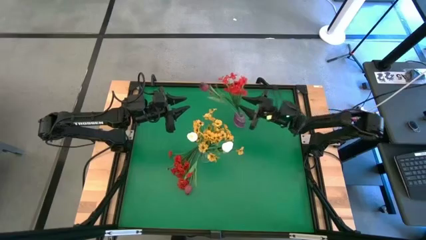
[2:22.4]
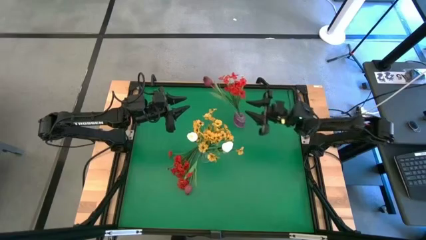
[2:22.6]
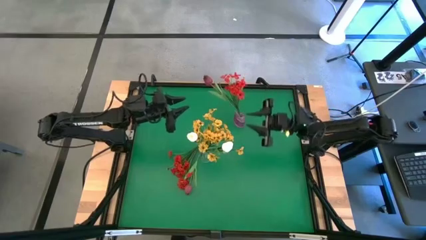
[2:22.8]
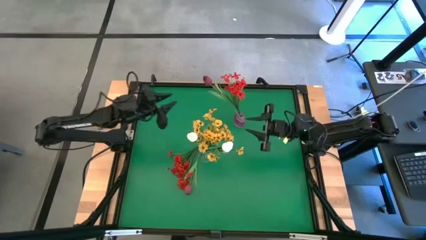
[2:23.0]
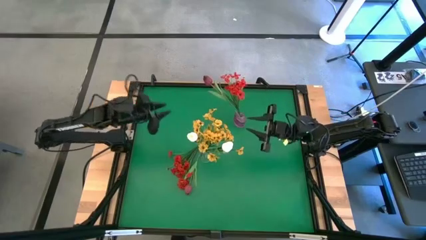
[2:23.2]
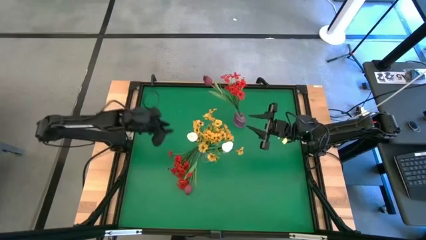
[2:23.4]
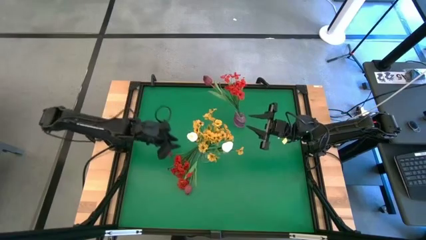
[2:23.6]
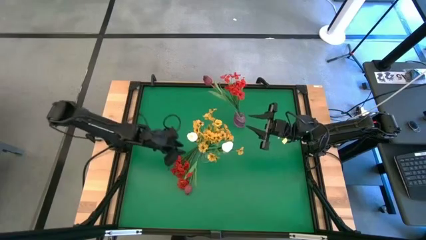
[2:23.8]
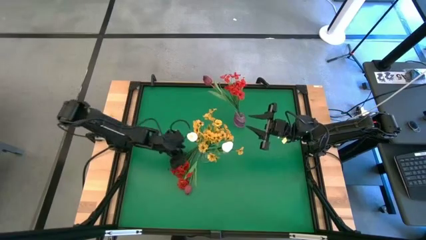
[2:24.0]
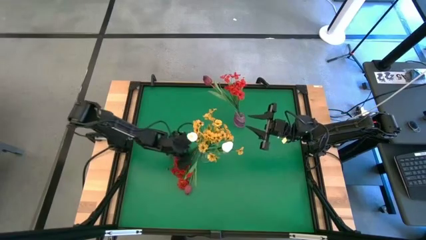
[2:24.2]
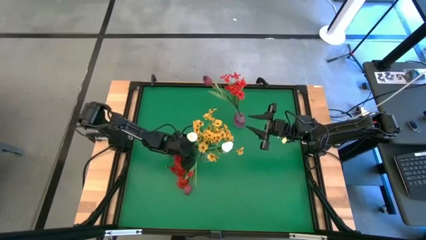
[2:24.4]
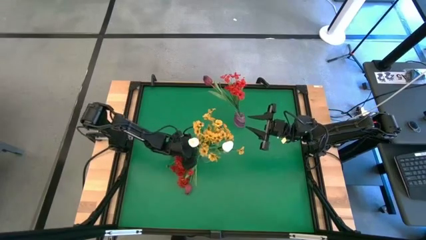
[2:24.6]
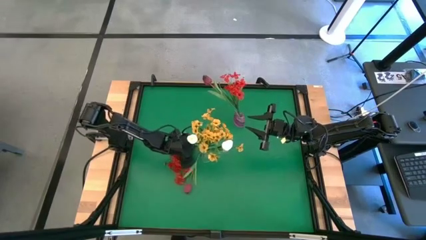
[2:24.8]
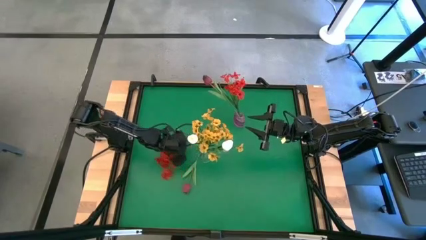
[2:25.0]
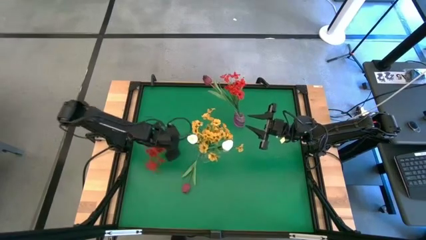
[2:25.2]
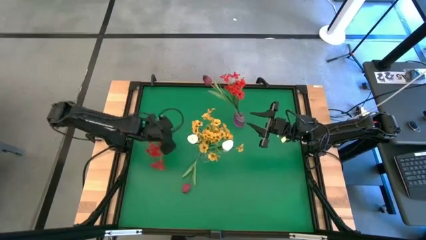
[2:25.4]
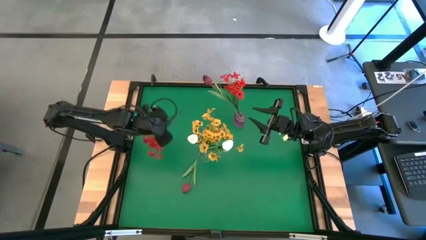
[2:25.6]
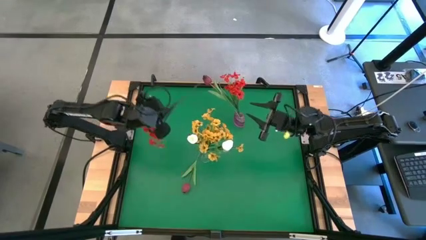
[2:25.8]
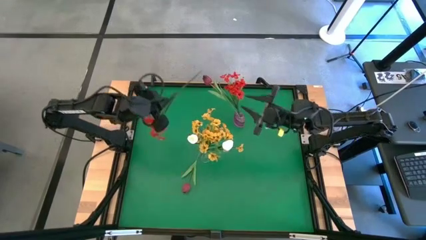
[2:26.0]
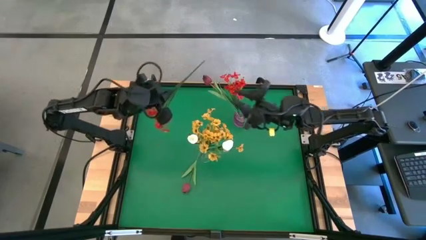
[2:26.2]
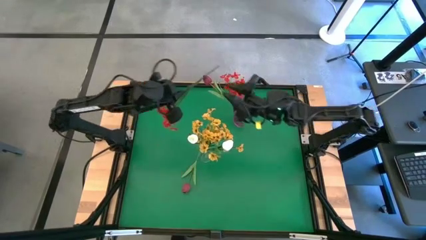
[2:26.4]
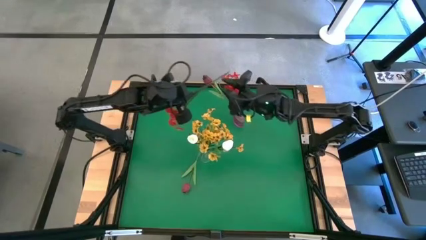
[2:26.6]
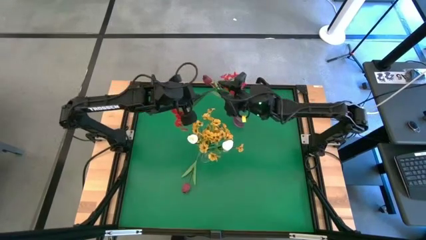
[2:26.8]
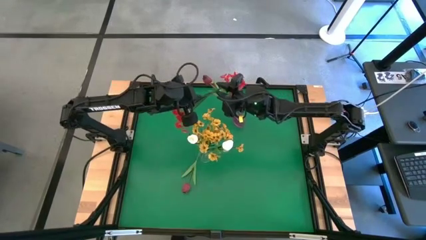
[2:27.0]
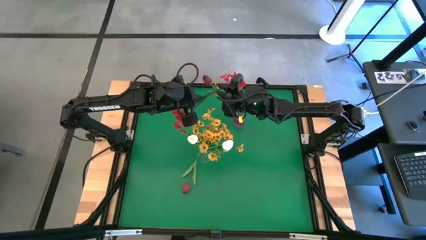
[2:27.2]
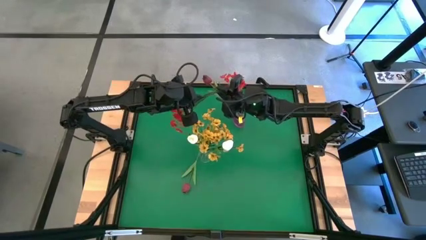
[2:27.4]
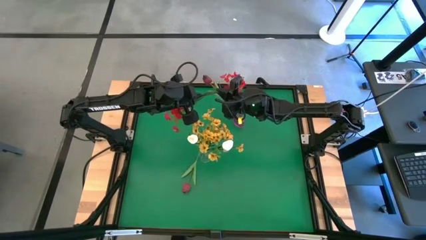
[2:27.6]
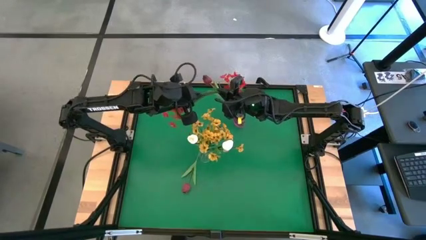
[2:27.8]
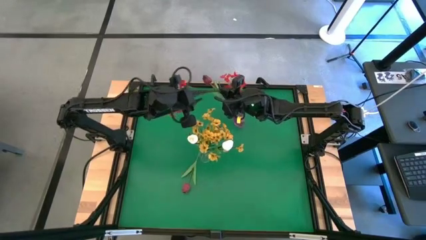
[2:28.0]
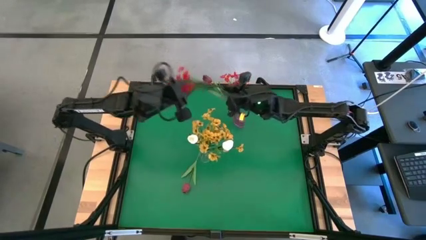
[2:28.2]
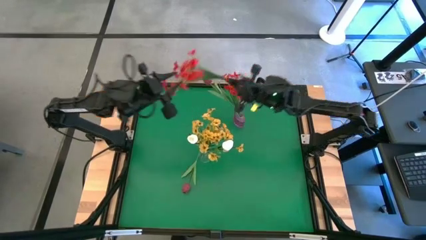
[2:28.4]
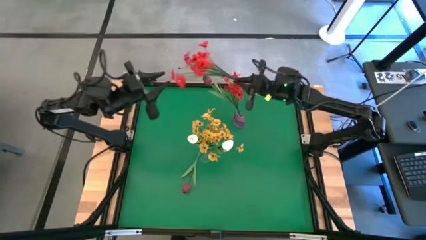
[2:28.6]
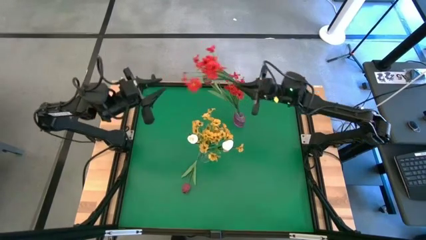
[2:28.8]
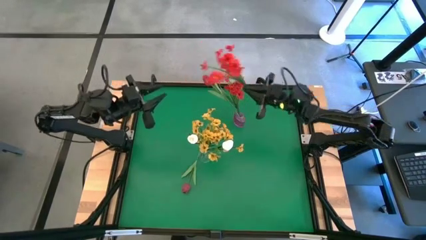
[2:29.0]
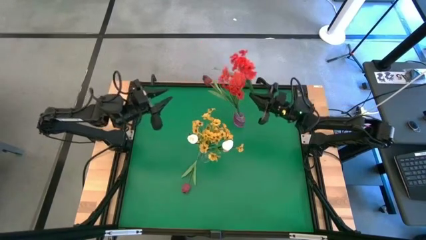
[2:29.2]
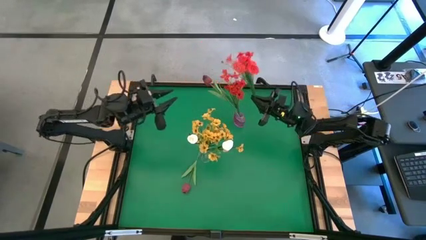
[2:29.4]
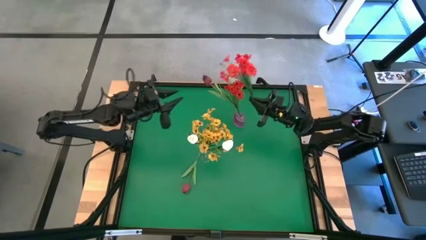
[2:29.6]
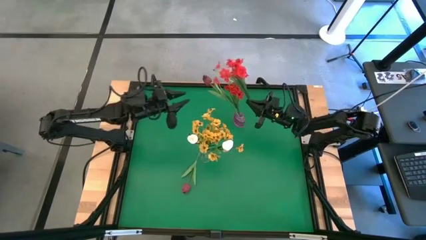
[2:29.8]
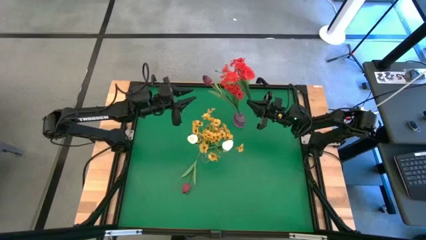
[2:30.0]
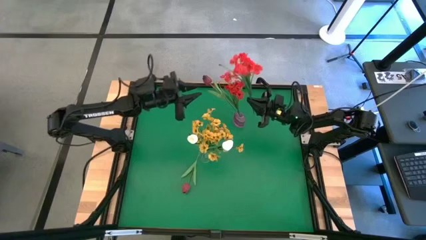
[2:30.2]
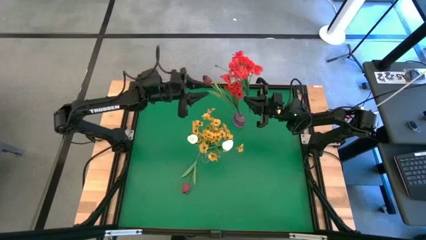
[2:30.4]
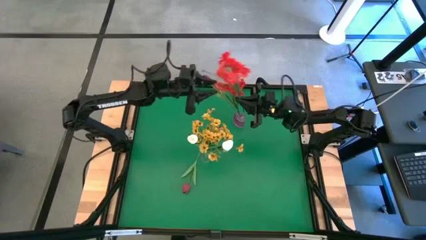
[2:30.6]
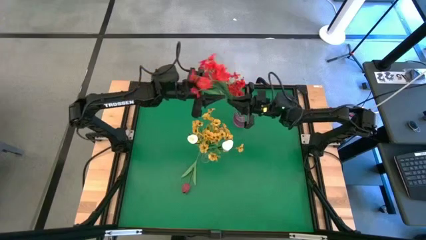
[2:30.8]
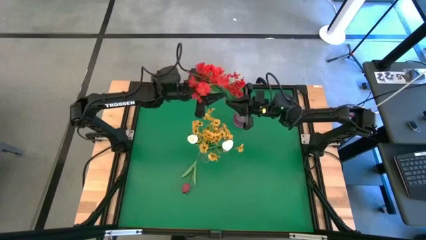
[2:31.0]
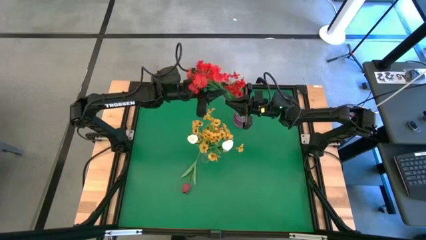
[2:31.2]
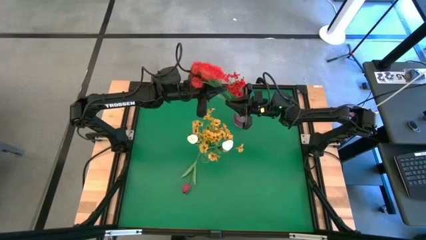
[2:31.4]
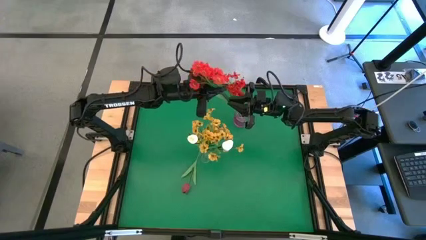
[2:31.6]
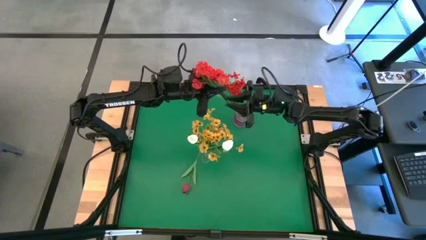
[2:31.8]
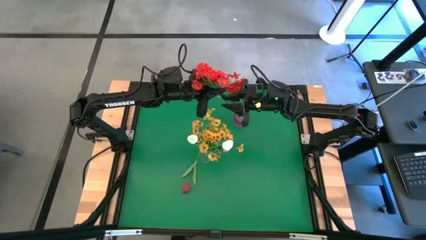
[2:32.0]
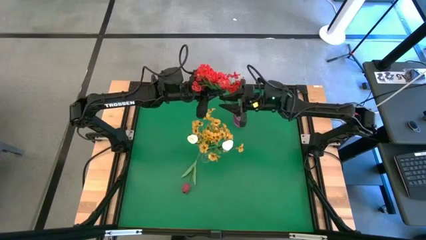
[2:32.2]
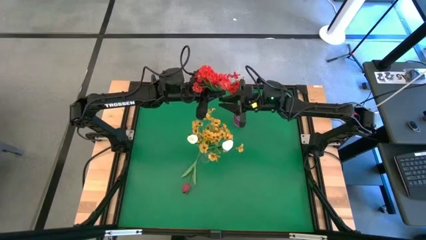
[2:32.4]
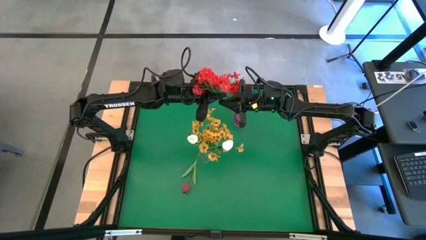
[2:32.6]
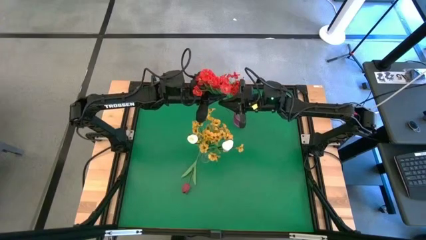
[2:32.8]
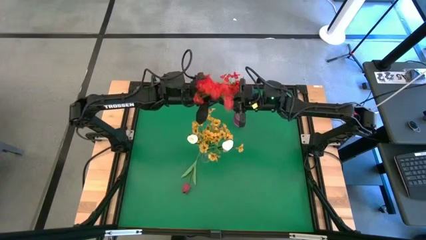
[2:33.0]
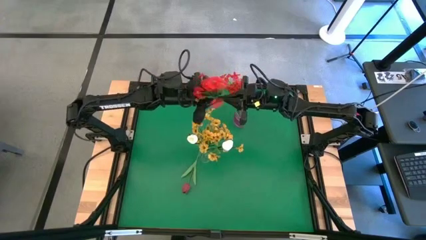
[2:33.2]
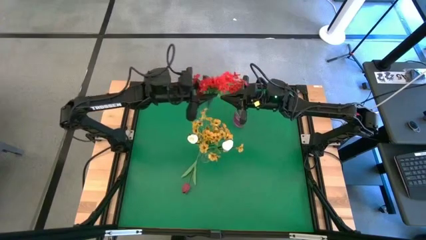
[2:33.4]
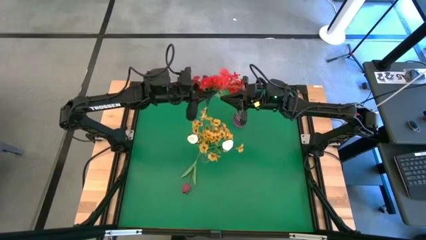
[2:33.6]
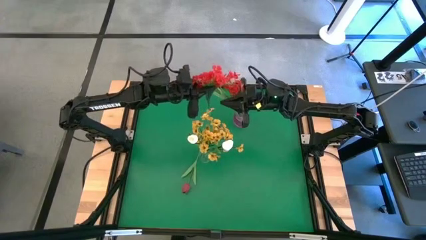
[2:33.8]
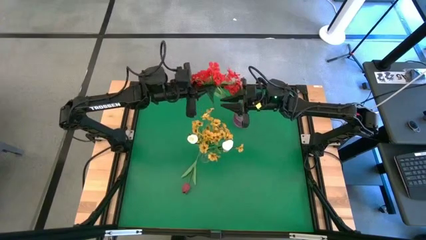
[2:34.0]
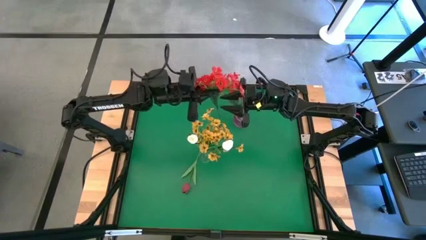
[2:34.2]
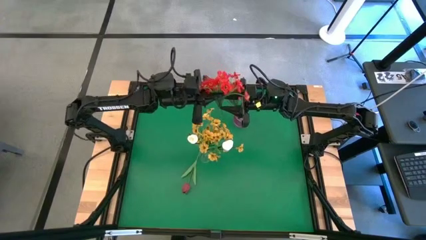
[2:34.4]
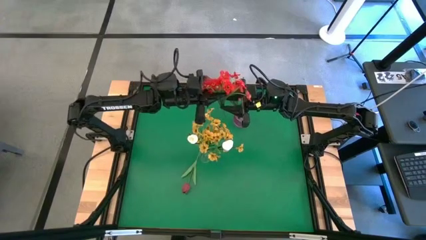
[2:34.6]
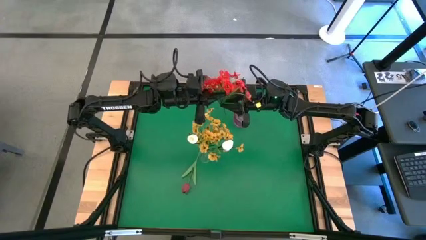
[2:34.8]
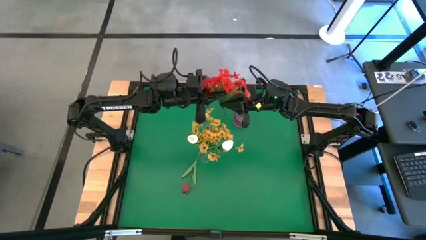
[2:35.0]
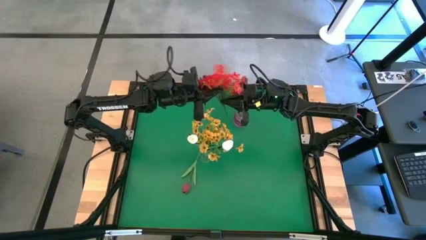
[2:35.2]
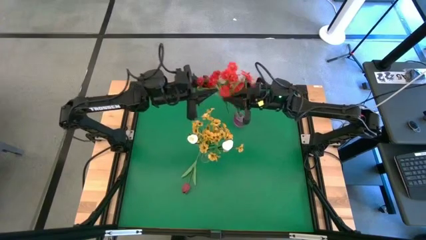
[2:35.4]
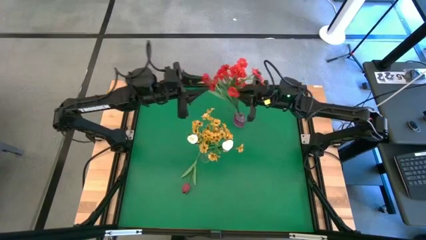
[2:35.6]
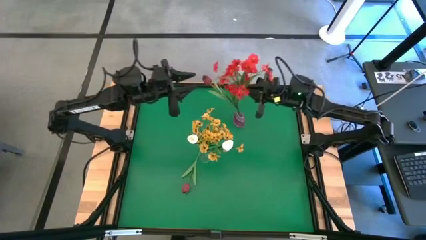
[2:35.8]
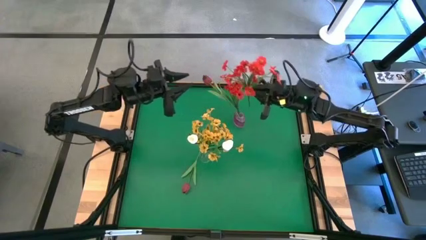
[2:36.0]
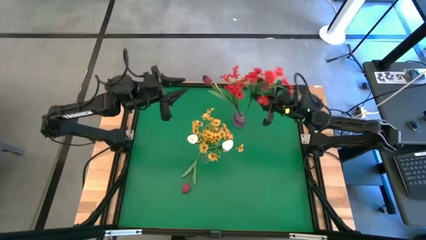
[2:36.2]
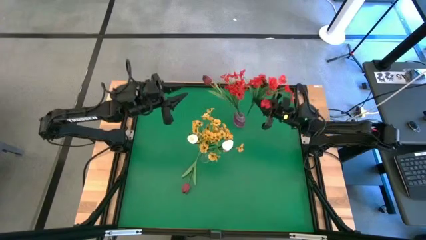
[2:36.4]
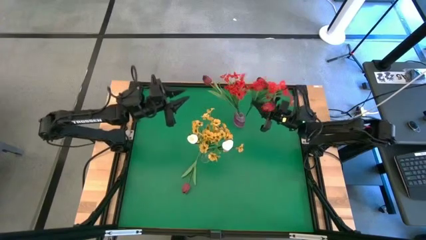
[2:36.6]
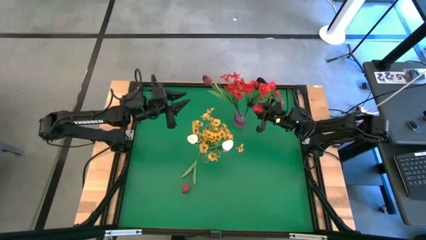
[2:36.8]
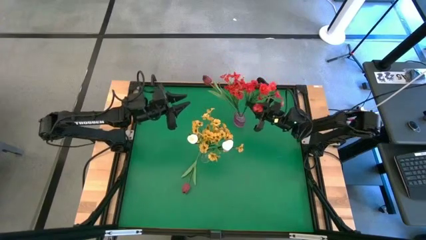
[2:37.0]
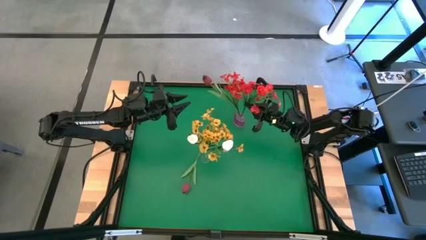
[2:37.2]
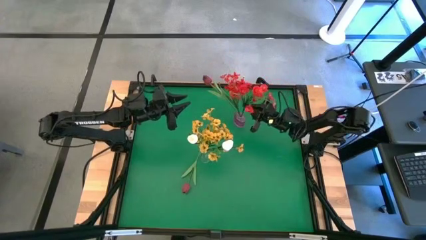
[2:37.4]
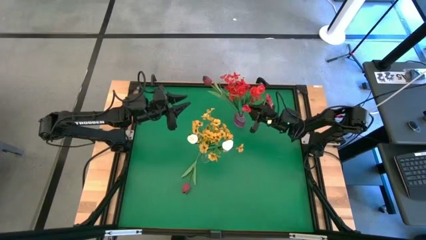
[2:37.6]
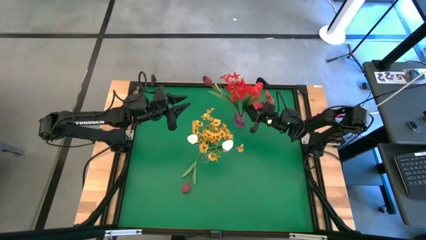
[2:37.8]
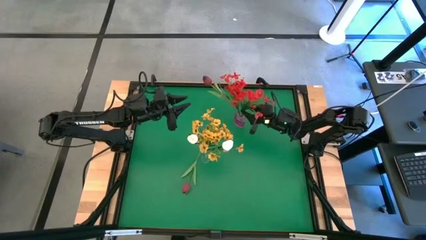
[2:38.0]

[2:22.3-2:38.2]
Task: Sort flowers into vase by color
Put the red flowers into the violet vase

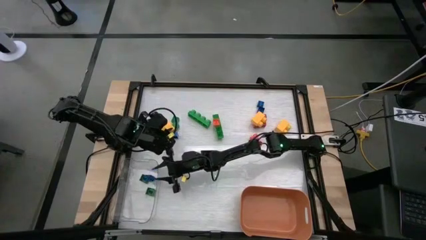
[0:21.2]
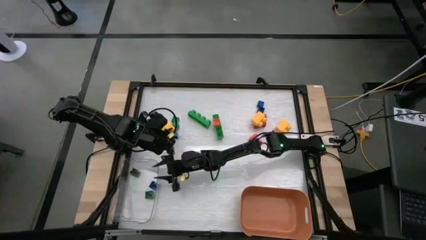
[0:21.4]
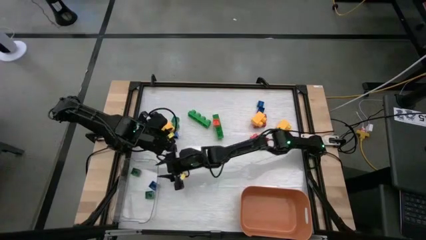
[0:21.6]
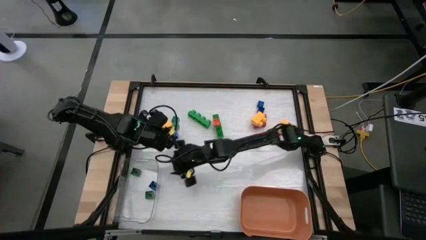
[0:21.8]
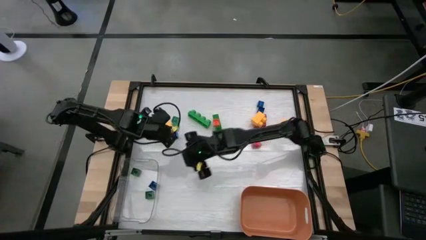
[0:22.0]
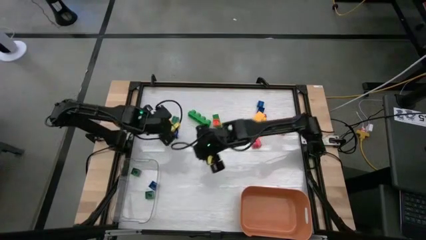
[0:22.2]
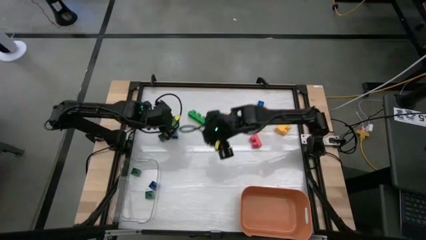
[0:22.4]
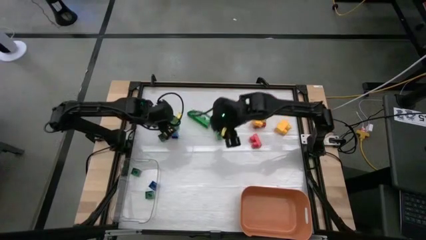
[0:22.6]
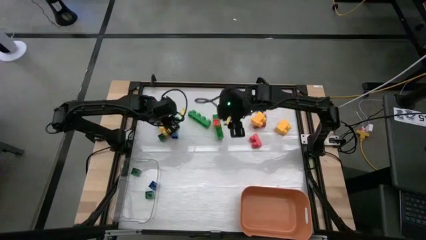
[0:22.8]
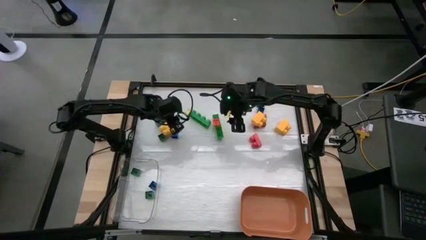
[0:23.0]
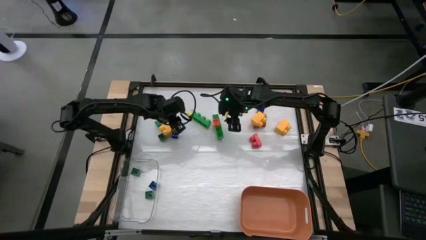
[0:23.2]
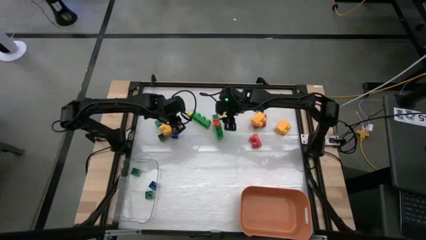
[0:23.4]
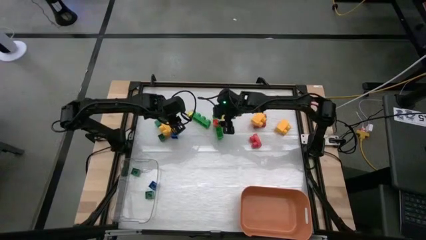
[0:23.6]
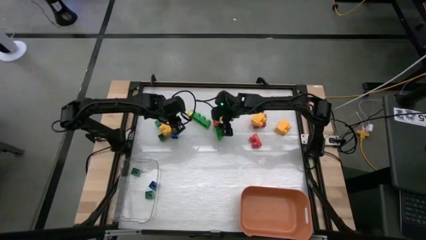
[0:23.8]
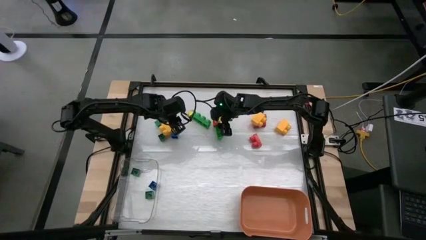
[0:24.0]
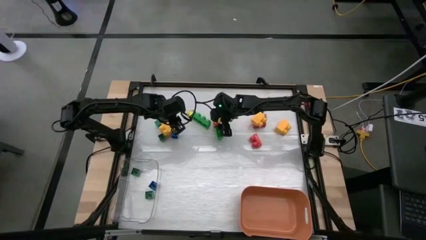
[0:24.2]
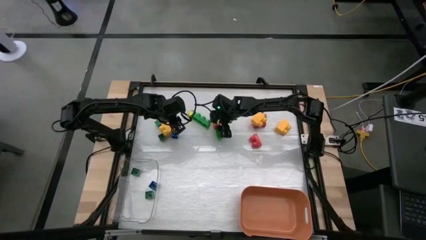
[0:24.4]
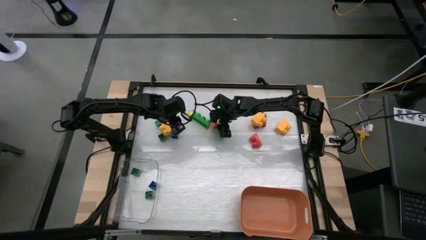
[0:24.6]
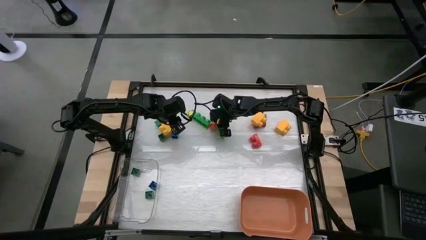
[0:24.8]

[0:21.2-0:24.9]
Task: Sort blocks by size
Put the small orange game piece into the transparent bin
